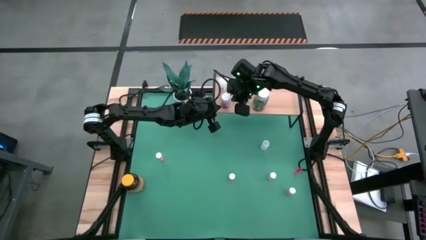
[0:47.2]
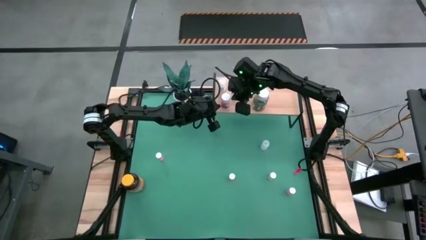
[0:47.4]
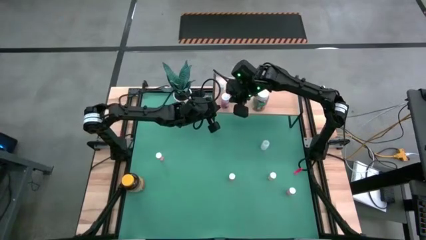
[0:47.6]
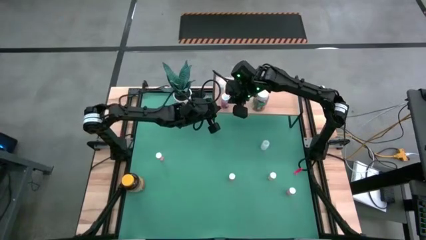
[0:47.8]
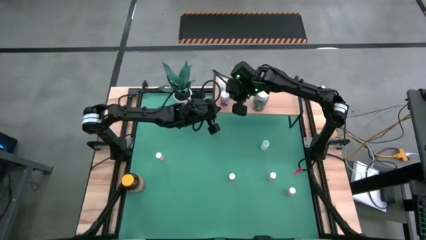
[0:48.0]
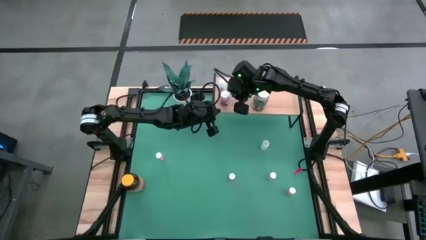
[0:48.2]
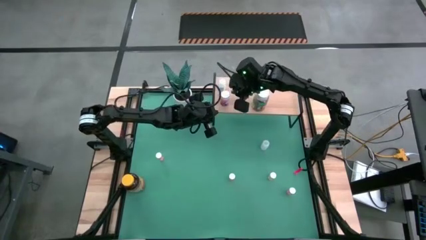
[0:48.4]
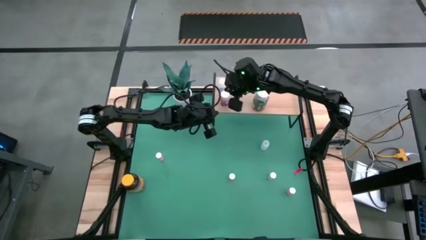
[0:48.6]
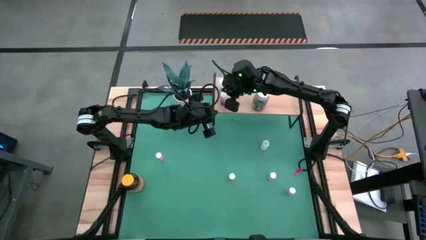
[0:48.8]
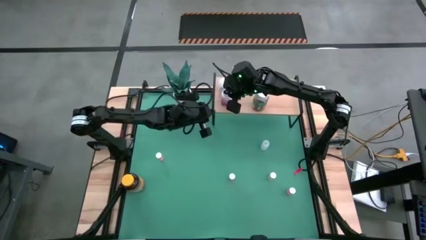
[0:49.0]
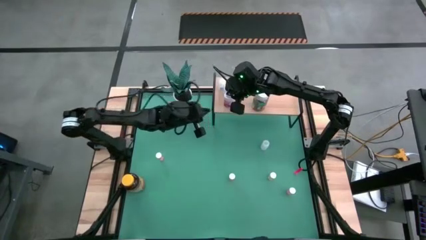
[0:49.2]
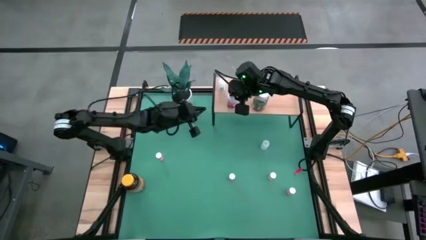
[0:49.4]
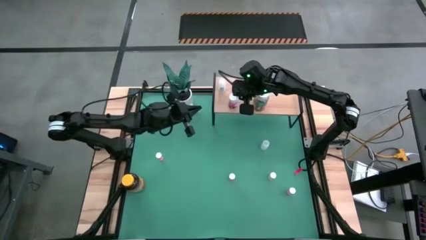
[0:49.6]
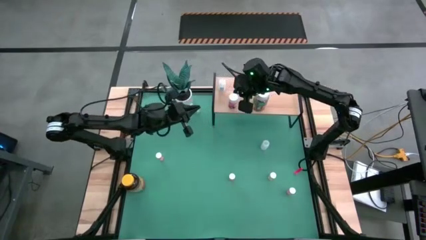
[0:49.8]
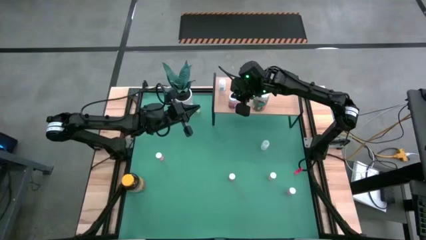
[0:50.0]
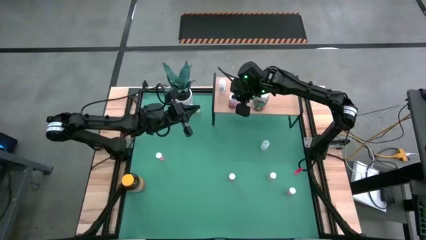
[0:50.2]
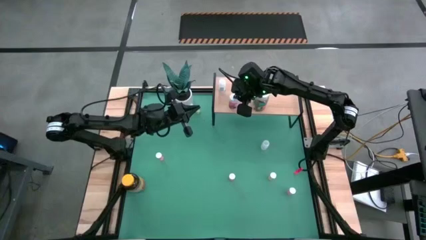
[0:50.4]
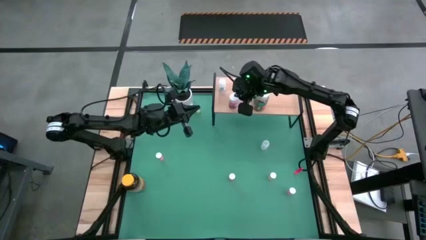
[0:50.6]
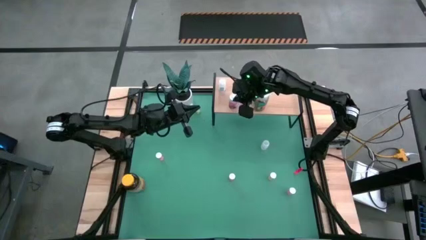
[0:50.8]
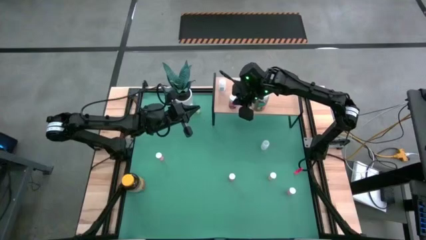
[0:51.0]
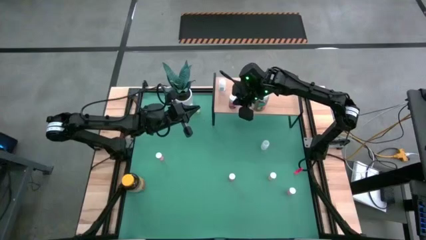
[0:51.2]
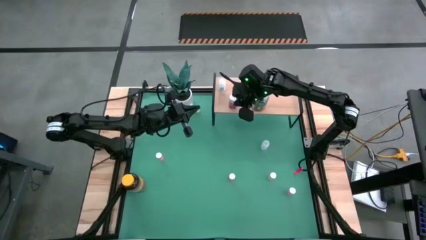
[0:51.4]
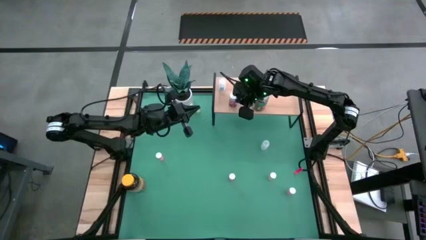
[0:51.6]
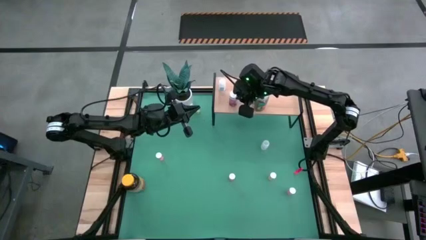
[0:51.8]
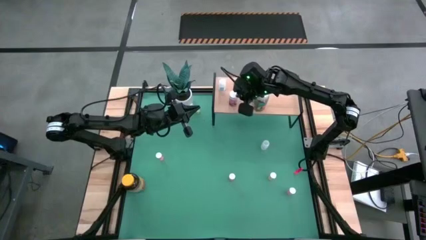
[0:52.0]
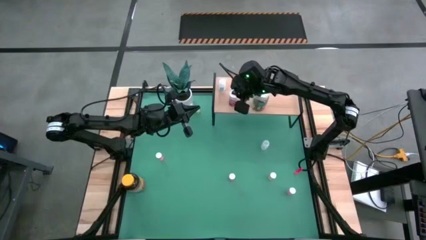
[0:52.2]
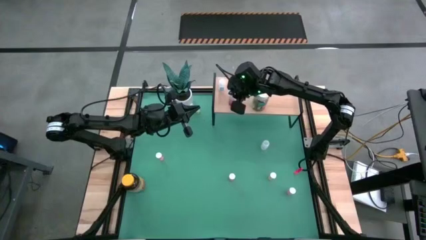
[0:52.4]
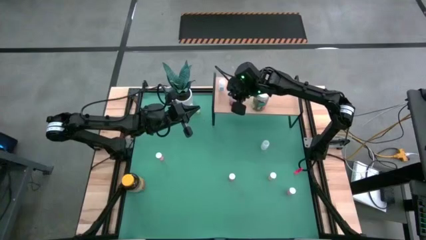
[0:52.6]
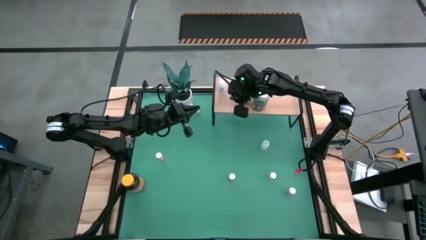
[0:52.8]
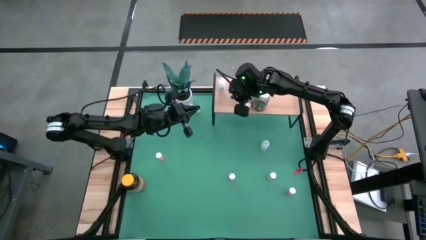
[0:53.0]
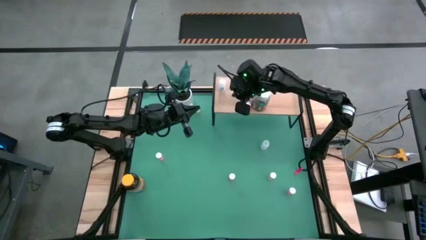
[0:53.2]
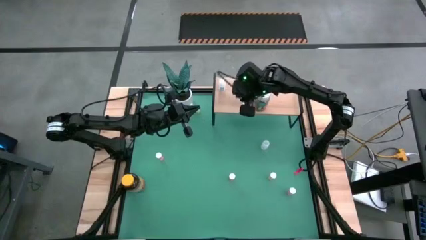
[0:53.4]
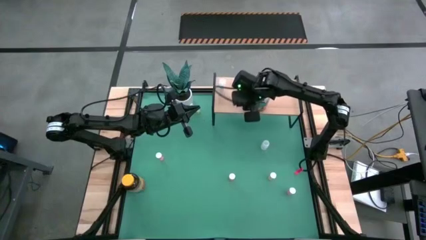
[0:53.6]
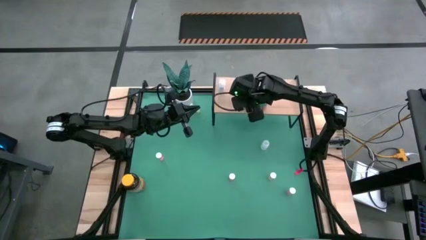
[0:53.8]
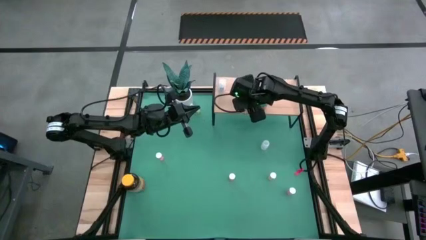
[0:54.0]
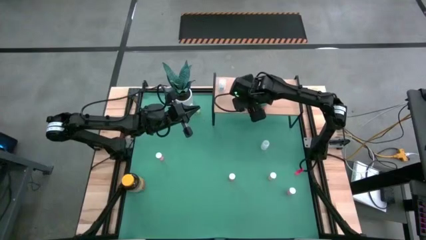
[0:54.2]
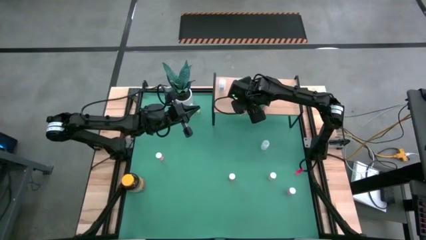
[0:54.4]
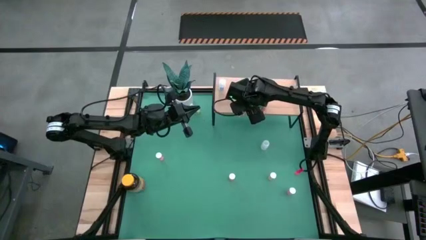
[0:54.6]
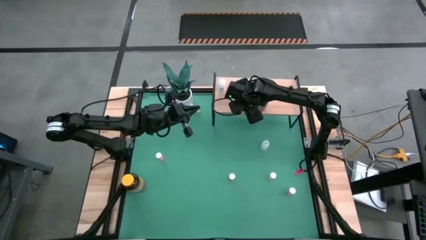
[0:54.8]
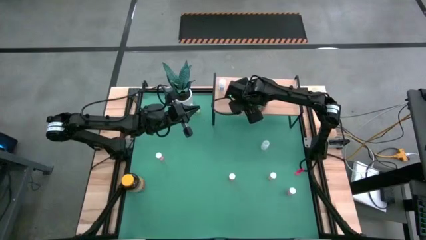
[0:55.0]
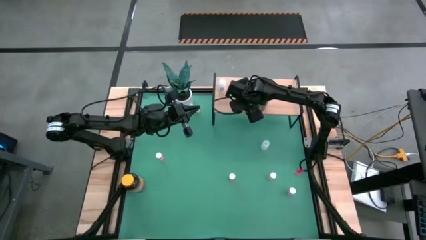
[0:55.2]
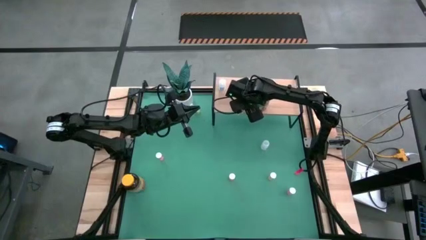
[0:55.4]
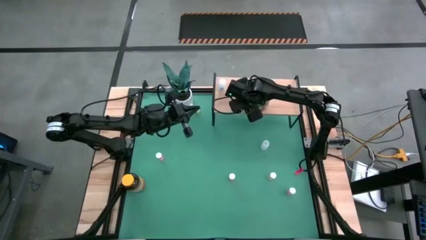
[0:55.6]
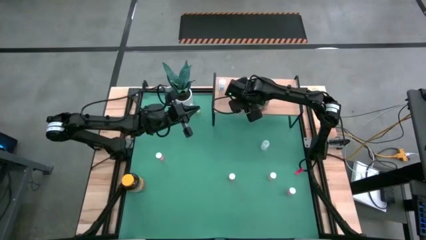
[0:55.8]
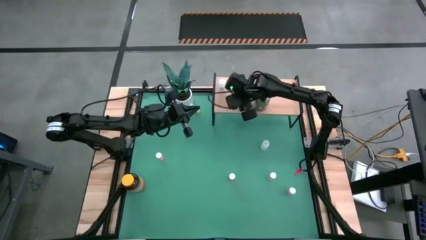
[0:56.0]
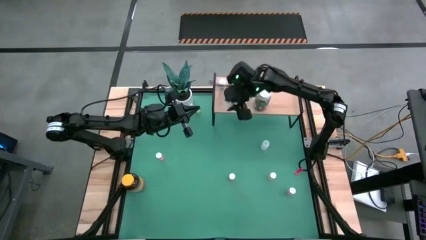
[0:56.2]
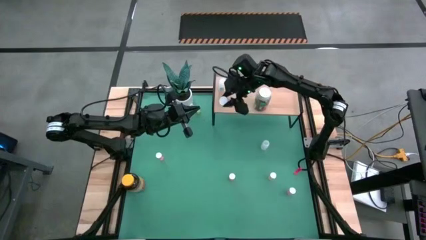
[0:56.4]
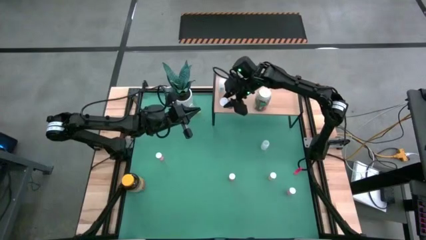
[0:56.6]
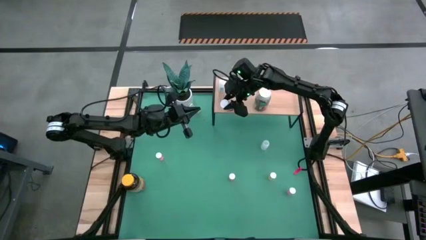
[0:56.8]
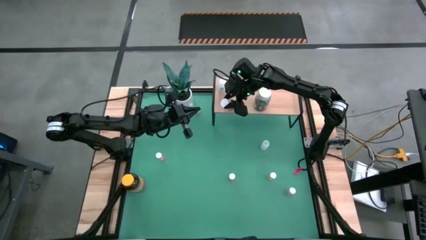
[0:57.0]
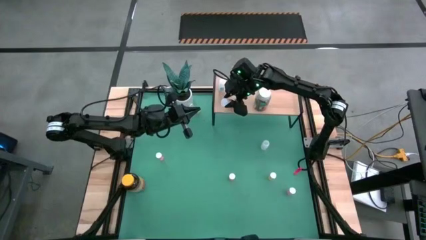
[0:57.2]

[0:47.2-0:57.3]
Task: Pick and place medicine bottles onto shelf by color
Put the pink pill bottle on the shelf

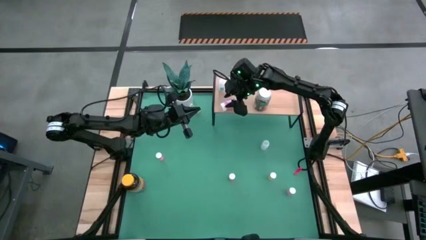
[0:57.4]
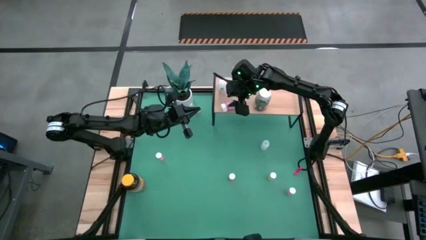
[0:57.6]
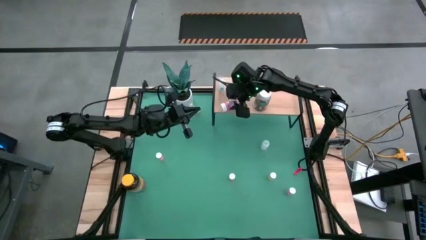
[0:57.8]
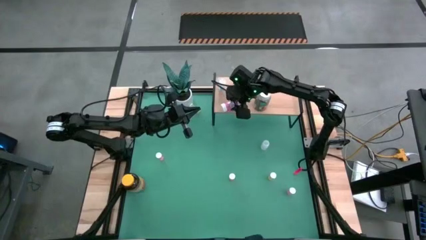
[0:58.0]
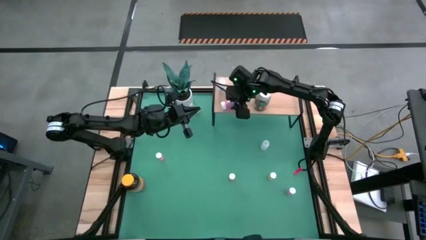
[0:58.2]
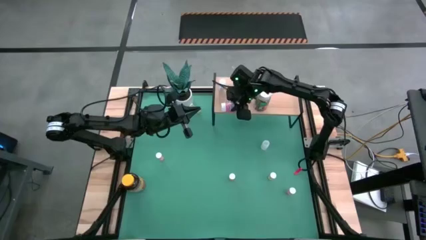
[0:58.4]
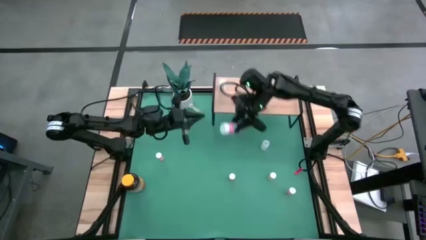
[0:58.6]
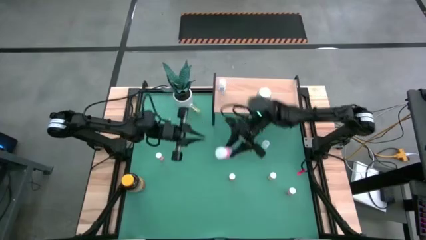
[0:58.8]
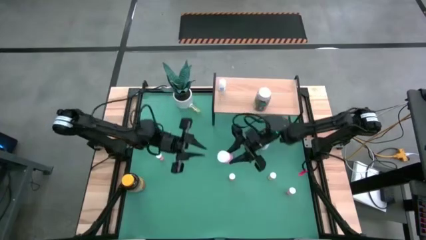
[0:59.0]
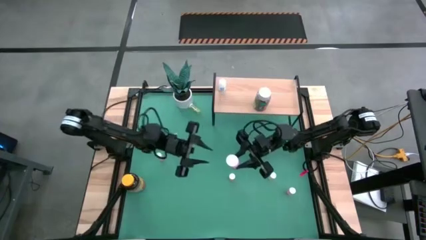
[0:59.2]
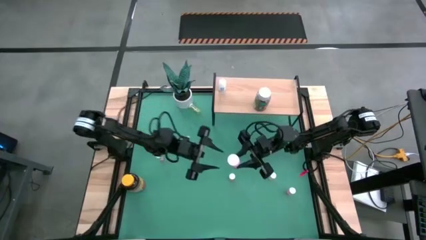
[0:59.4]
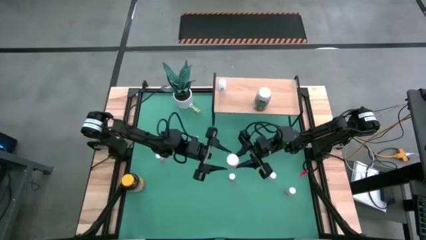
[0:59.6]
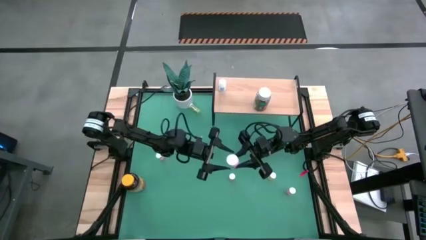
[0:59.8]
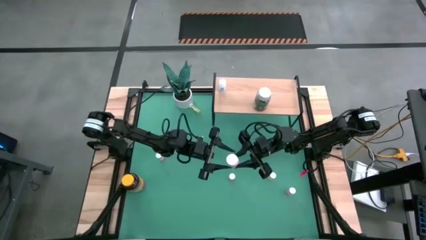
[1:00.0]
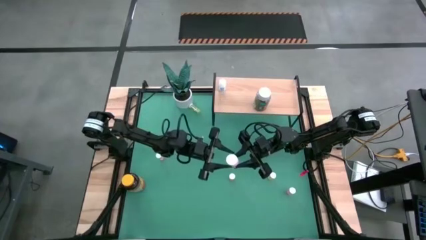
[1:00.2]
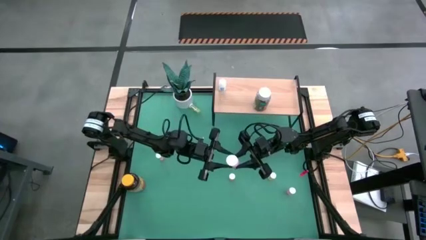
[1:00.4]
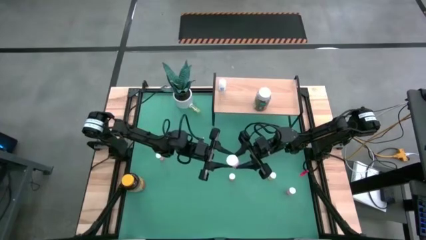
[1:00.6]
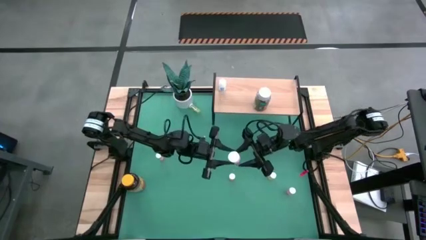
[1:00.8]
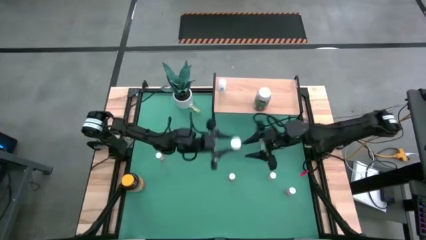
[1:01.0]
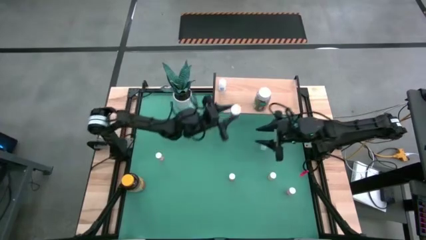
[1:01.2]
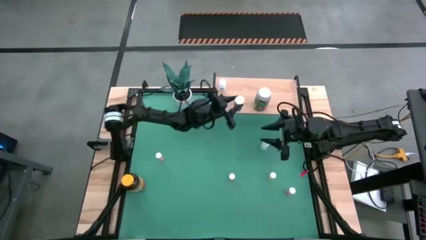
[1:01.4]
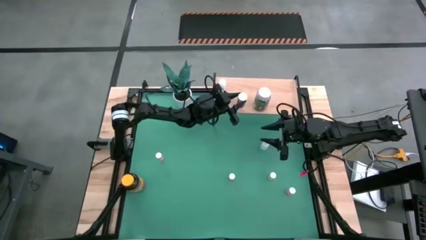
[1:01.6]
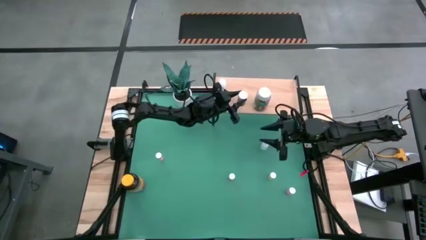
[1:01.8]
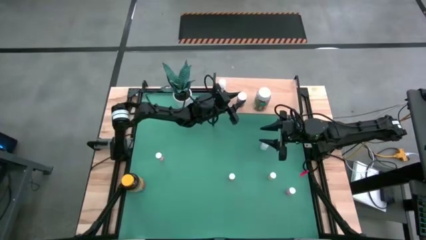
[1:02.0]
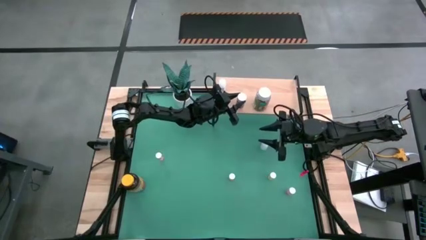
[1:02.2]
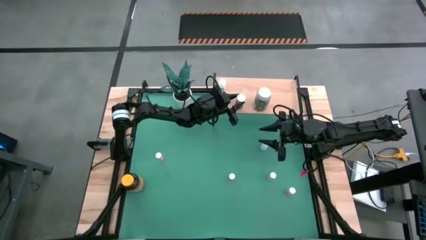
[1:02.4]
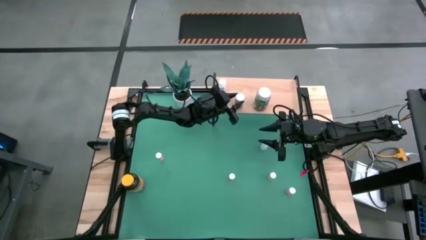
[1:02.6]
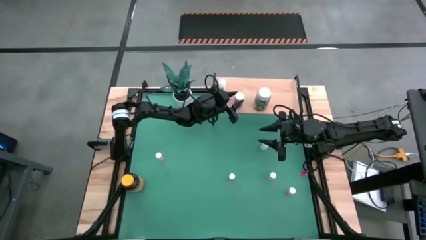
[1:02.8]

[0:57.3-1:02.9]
Put the pink pill bottle on the shelf
